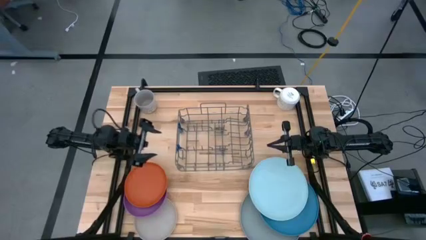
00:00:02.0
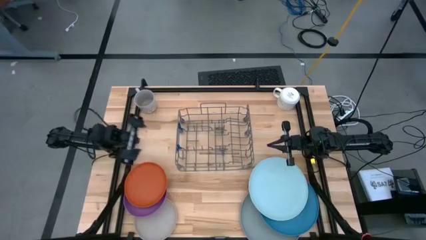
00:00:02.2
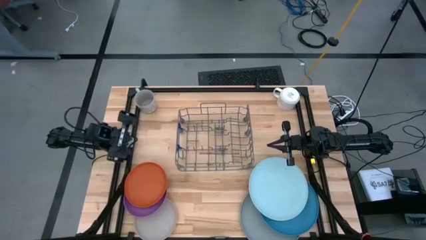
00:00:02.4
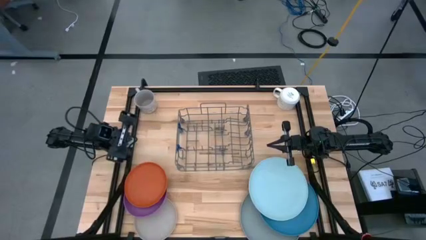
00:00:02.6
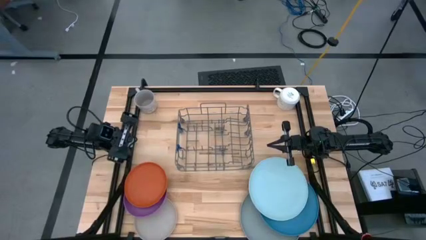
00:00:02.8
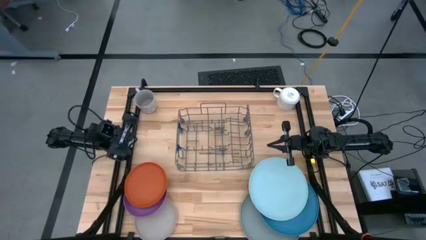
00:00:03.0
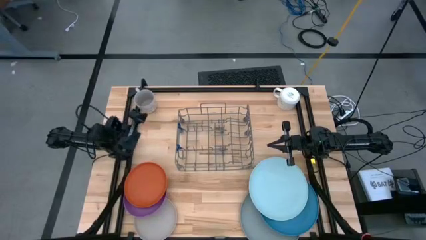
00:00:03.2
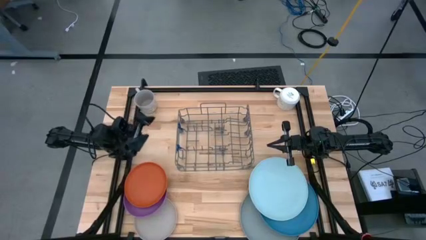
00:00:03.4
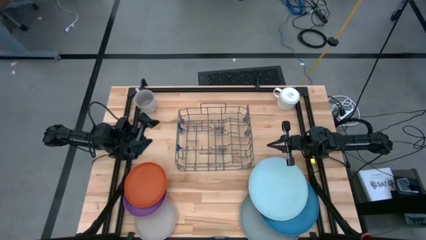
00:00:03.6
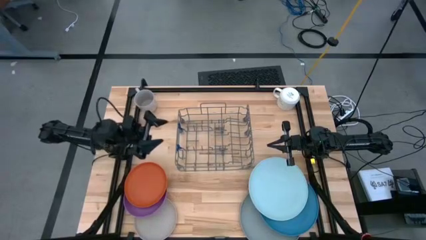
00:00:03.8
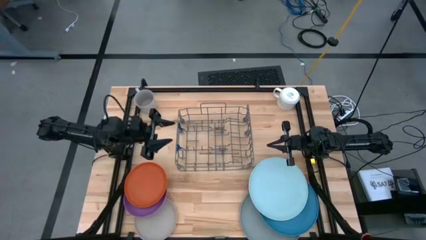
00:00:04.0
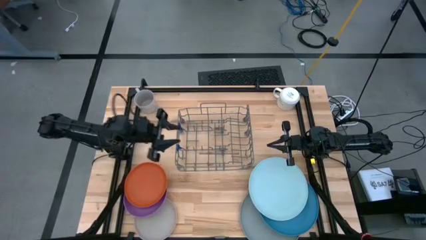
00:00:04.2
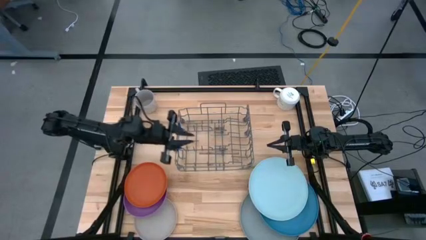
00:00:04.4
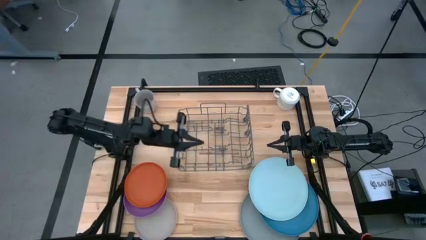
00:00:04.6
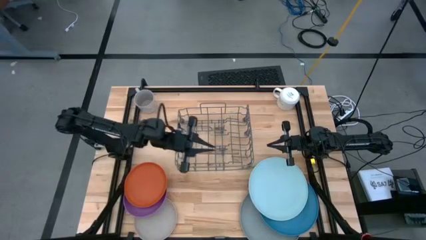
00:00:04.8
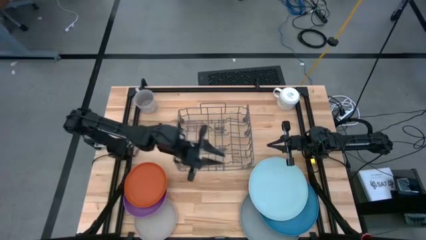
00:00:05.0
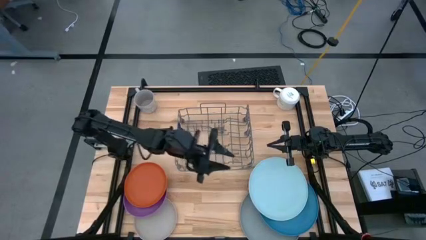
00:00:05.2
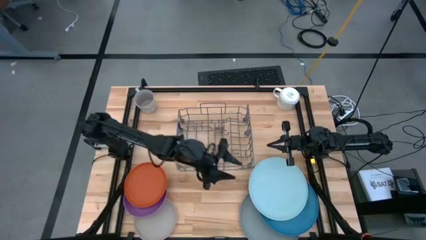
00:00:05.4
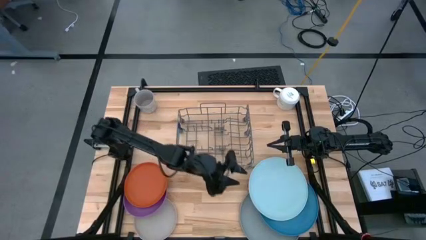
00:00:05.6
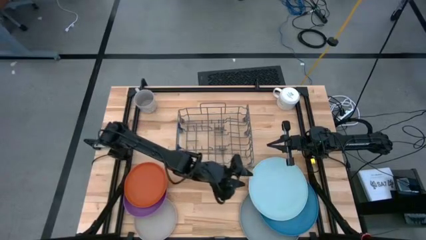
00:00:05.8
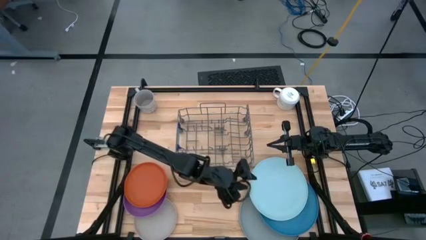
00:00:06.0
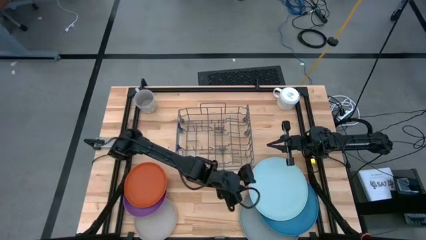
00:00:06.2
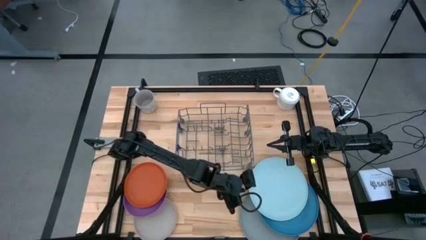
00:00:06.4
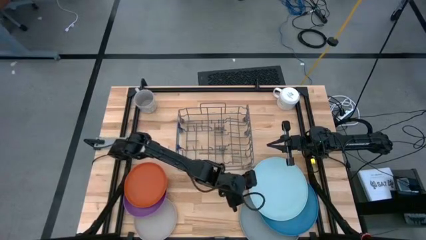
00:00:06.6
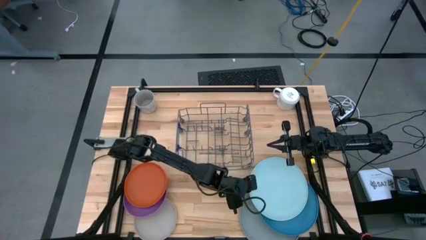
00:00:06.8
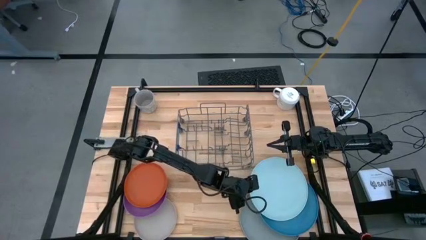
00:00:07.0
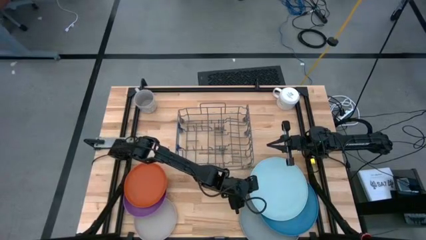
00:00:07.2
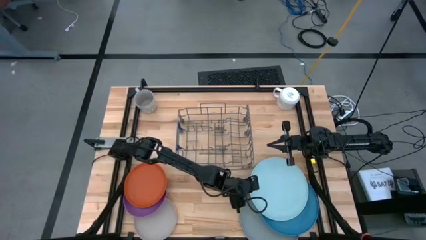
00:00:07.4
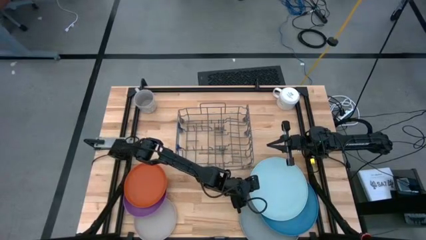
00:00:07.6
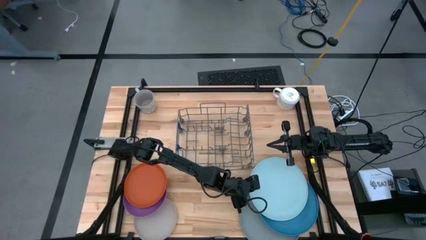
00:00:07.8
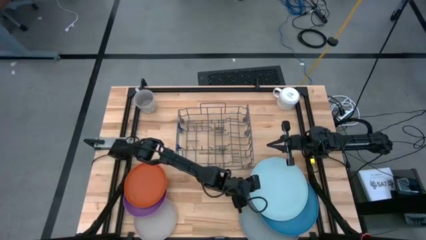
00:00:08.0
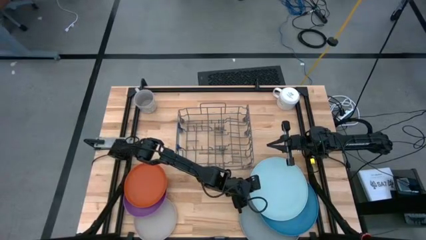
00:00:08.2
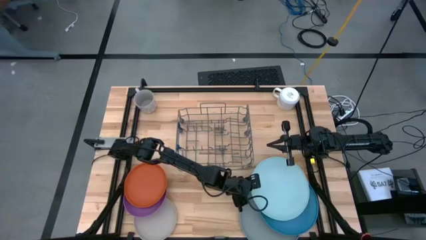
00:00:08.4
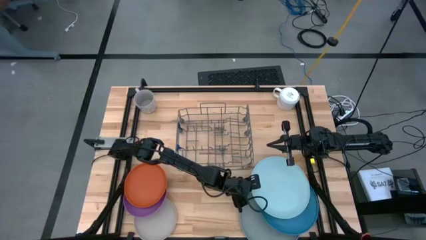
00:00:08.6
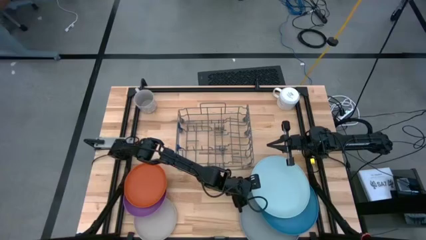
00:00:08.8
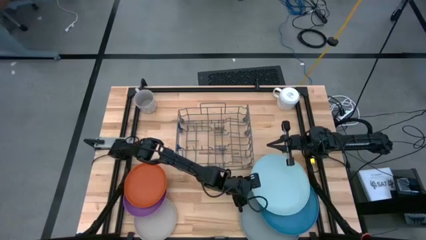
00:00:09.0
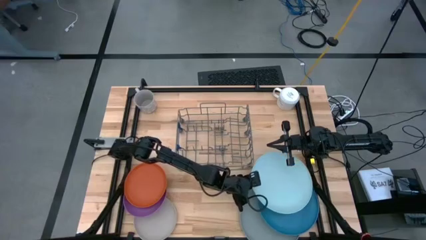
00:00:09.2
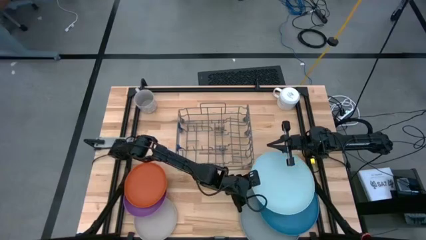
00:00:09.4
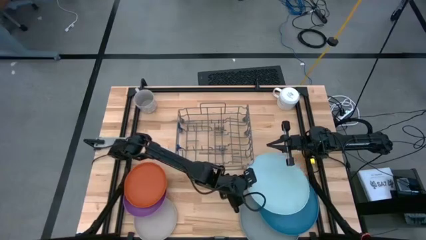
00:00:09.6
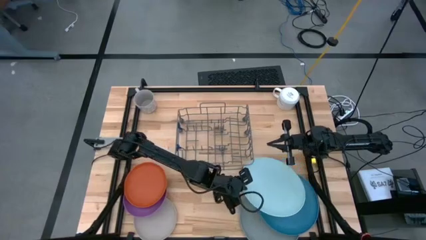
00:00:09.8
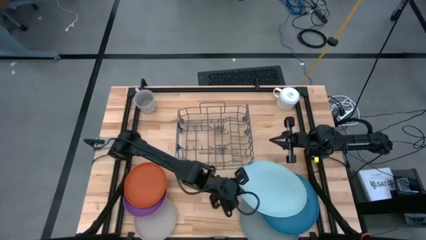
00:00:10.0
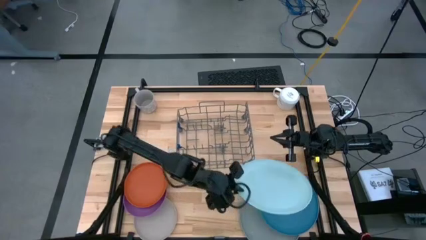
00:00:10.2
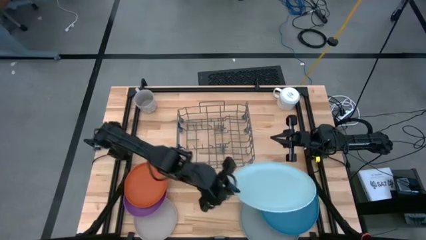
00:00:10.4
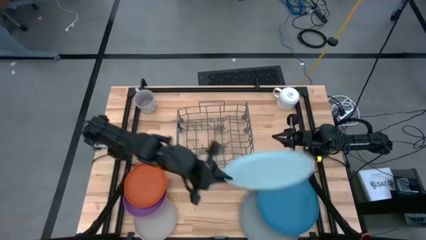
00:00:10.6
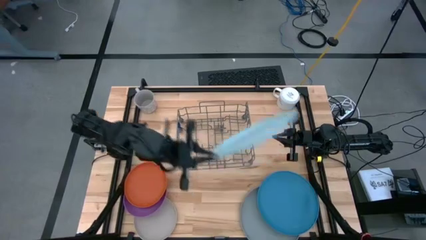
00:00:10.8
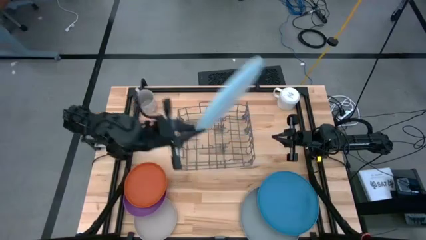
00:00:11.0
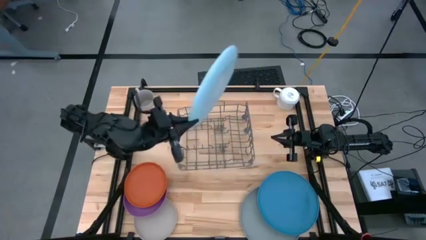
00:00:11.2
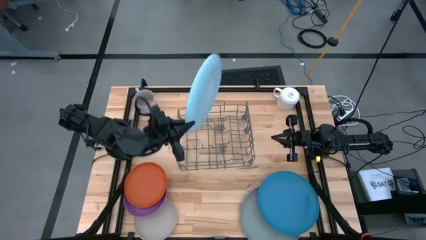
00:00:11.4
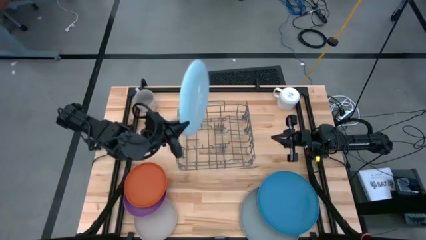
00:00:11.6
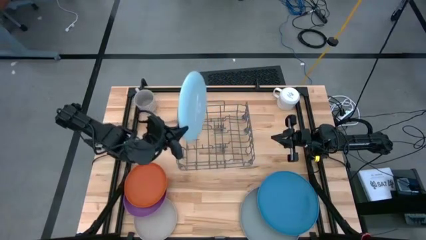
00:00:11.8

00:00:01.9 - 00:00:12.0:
Task: Sort dishes
Put the light blue plate in the dish rack
